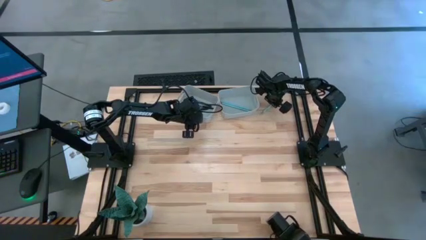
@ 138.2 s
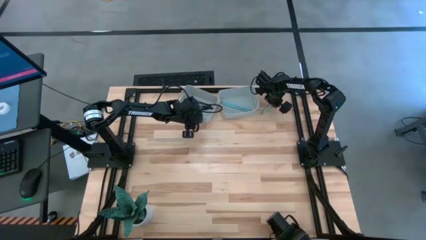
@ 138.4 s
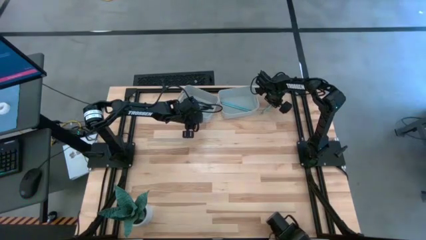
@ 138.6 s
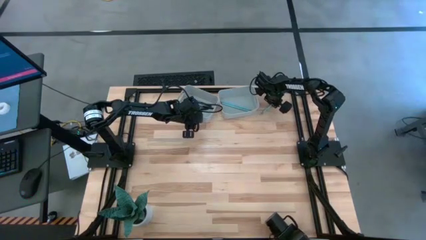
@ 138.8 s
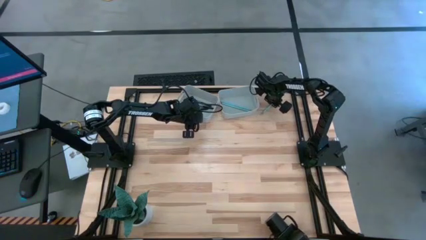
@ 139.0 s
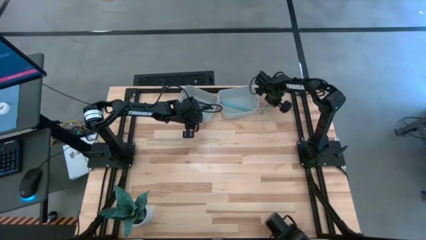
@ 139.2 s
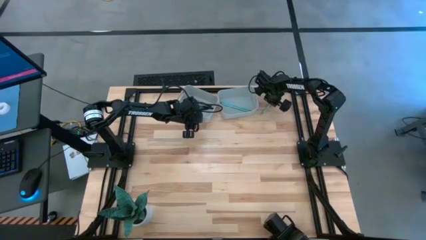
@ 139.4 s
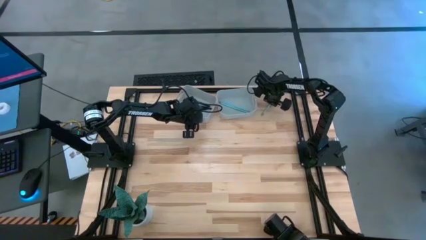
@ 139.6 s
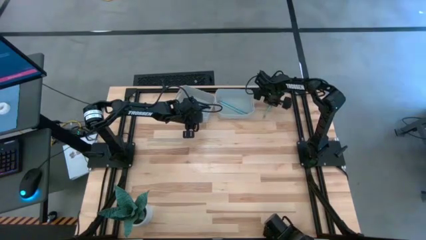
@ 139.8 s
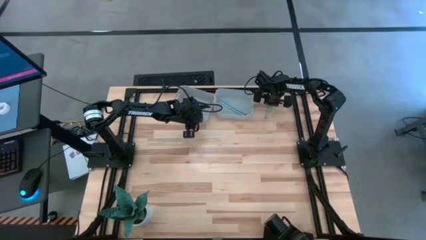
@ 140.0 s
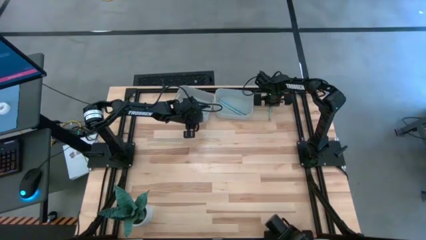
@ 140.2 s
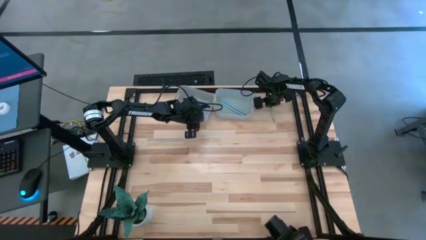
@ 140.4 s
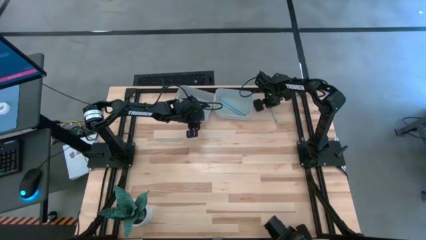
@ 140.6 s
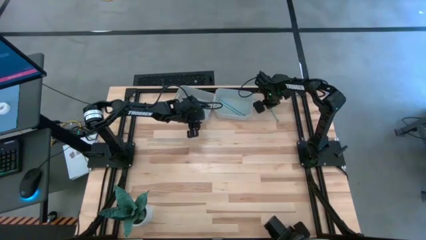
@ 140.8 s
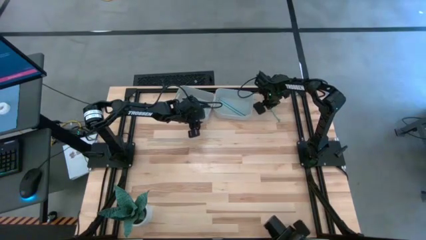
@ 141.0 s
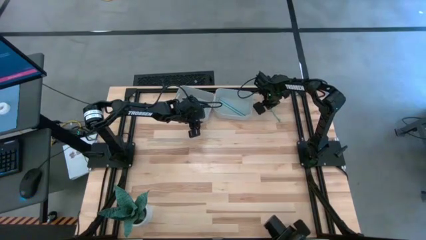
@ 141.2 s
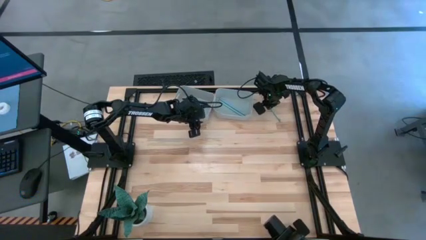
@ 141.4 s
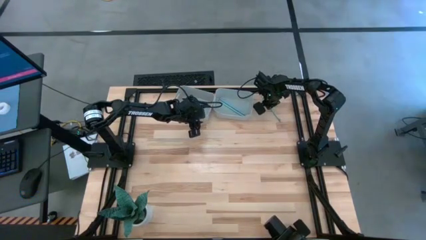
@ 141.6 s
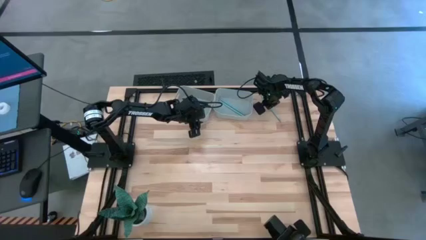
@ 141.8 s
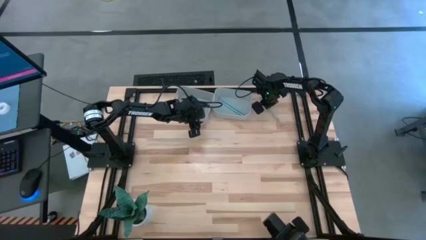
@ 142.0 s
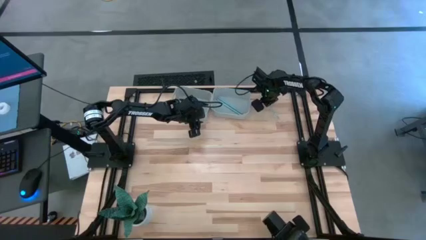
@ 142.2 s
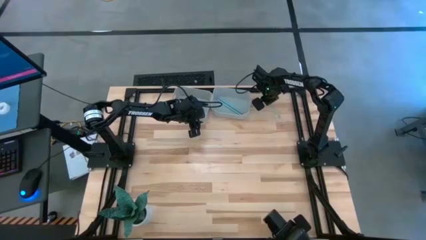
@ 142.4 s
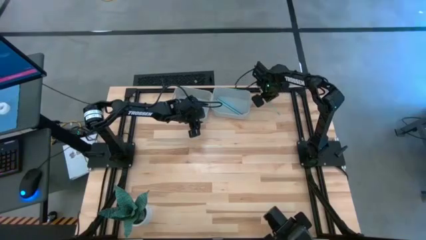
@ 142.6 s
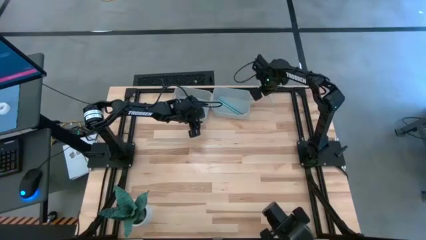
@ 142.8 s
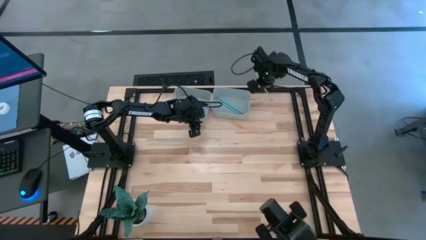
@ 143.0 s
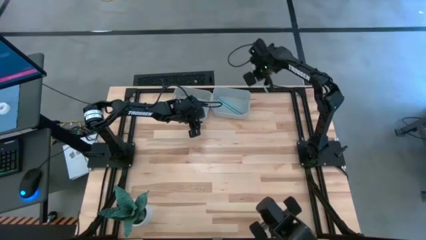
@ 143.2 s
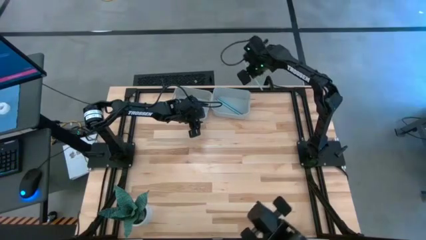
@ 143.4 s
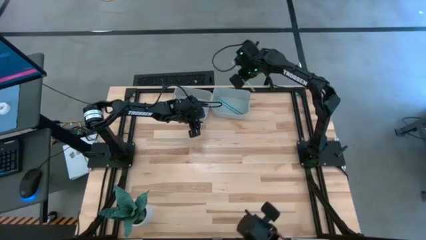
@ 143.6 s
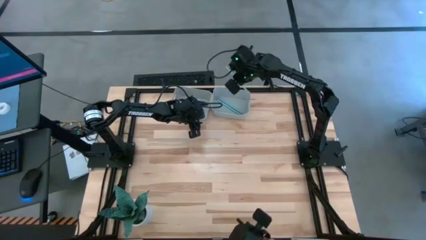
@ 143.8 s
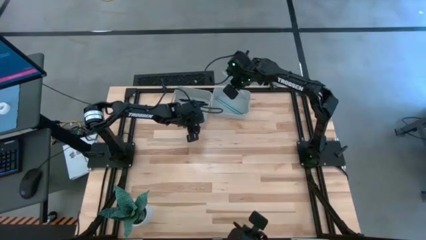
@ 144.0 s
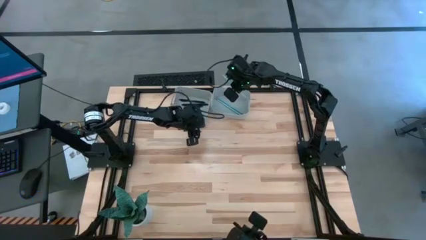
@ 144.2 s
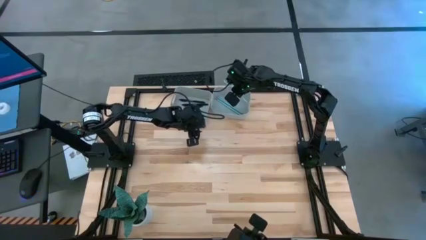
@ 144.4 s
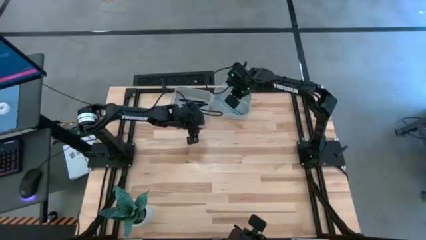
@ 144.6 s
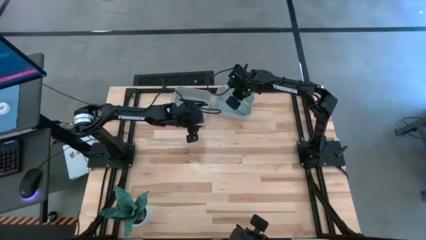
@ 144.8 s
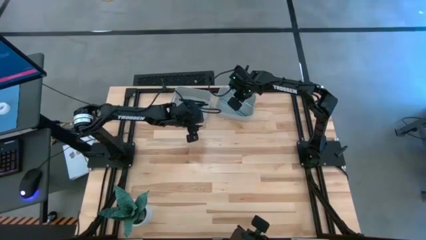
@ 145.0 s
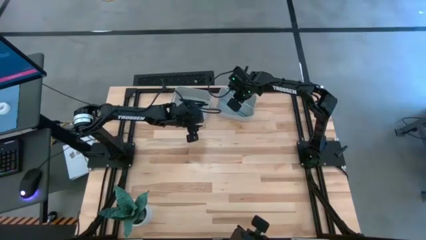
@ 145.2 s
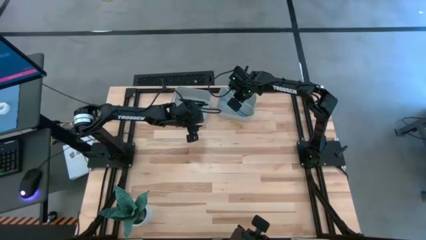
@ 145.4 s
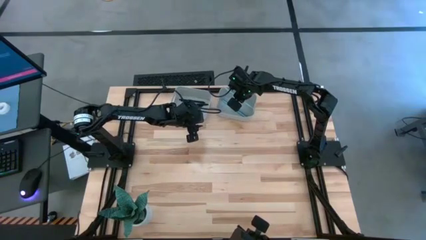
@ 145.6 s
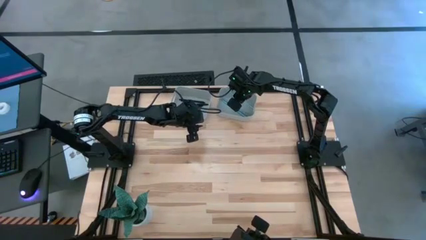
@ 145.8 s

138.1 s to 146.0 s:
Task: Sort pens & pencils
Put the light green pencil into the right gray bin

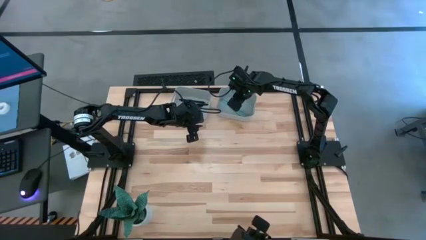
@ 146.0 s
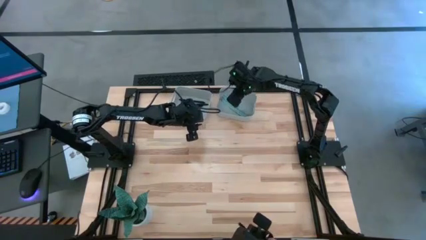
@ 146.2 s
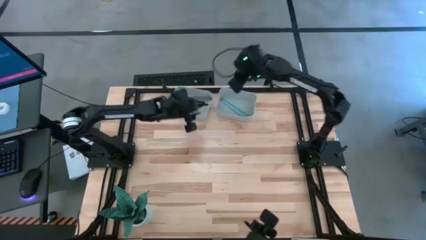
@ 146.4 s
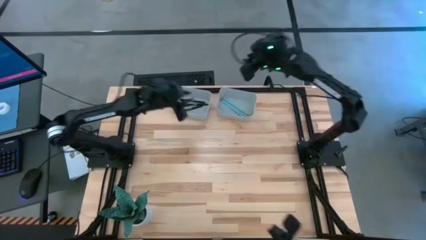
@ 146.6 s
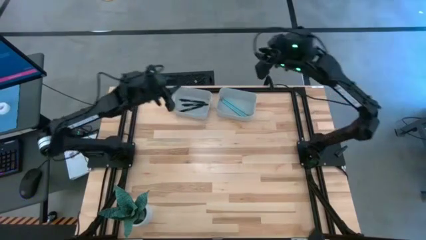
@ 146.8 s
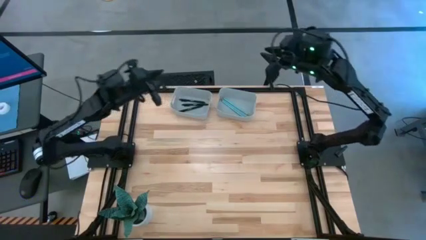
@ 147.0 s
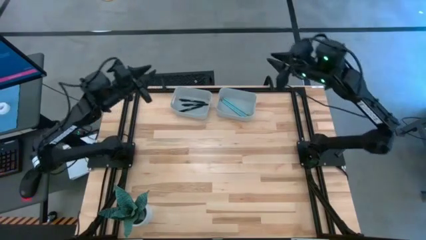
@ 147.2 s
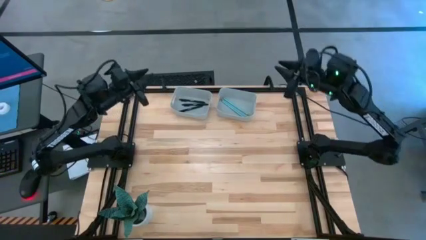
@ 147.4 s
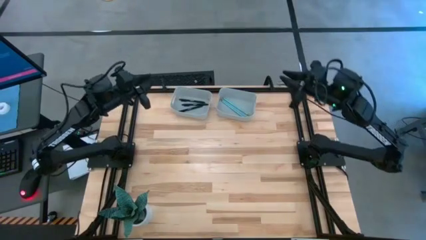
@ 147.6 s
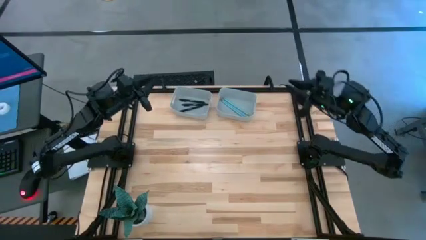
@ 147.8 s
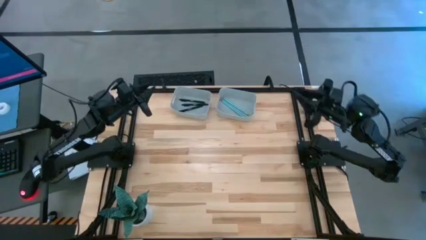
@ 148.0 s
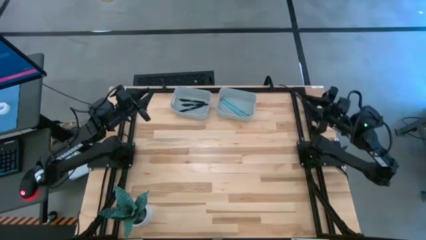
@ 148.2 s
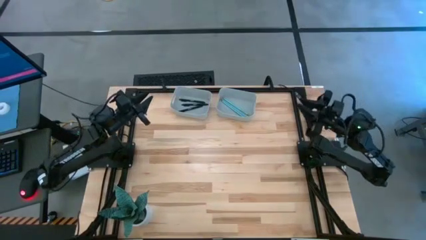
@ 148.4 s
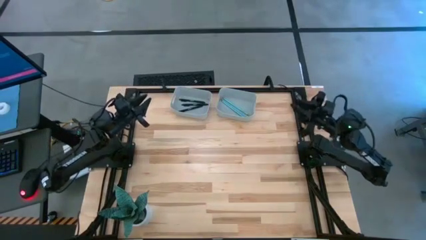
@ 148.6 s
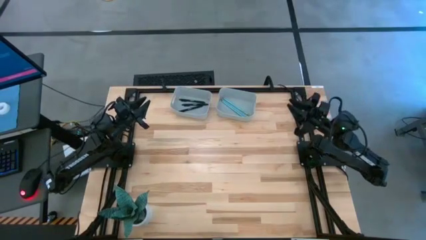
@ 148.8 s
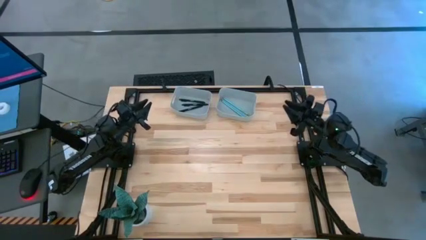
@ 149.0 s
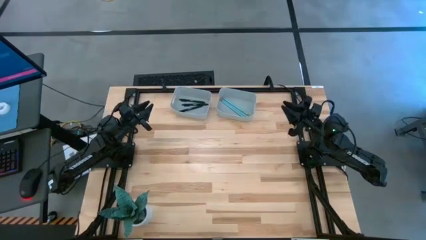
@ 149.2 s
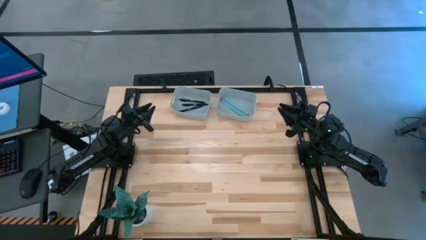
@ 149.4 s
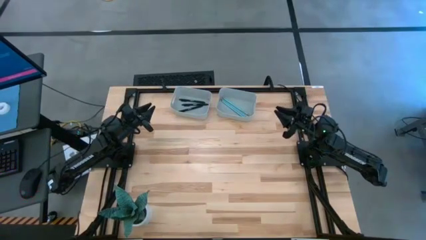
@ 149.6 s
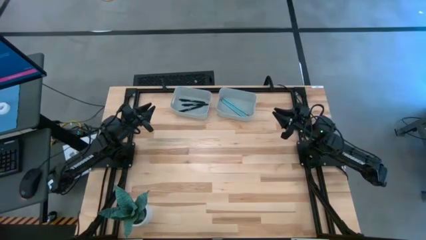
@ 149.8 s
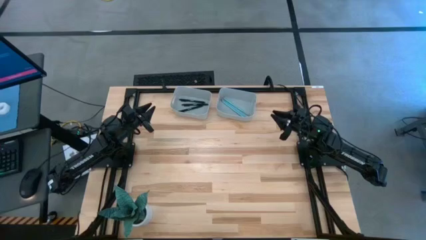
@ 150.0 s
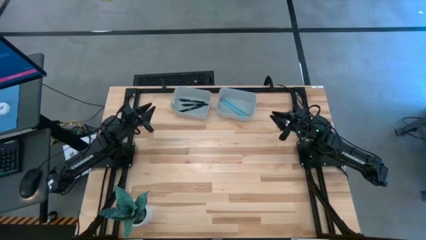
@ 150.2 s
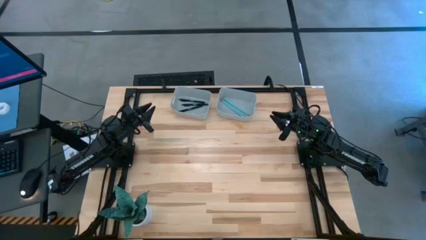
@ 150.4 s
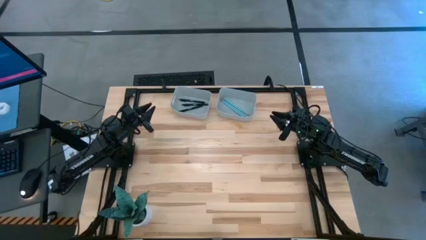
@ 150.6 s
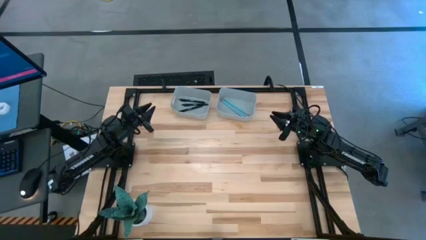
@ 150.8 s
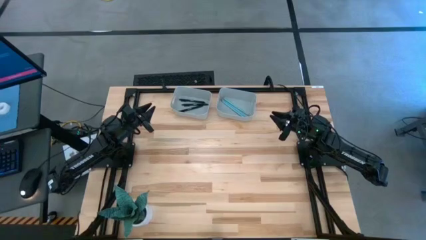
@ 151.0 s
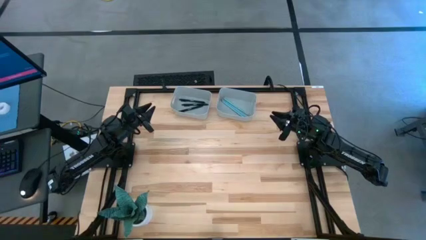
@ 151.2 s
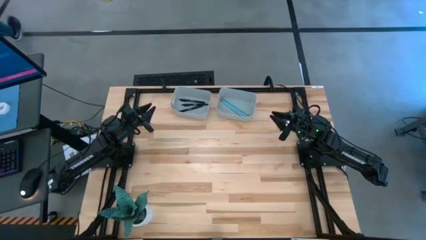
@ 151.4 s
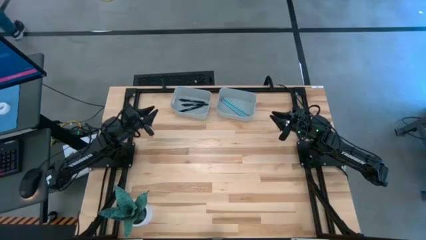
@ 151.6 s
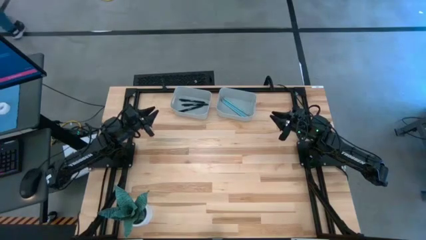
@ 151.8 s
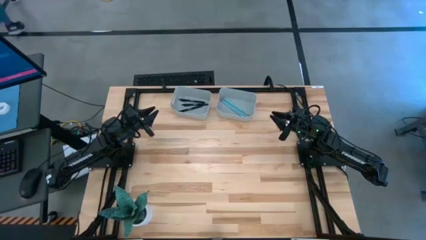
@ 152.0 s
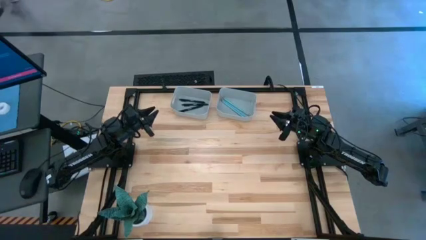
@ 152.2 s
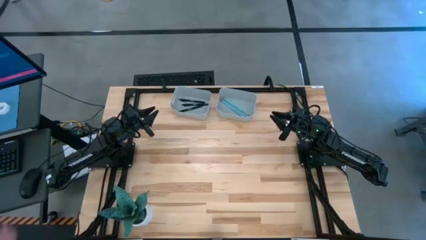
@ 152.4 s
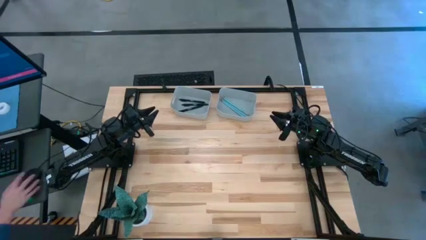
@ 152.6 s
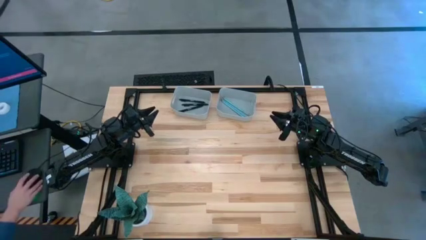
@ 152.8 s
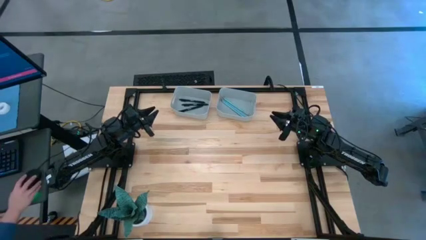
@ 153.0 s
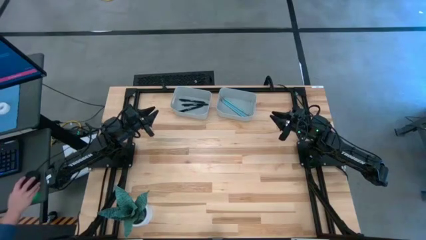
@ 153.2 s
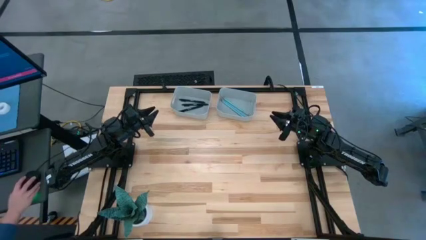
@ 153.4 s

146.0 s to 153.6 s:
Return to Home Position
